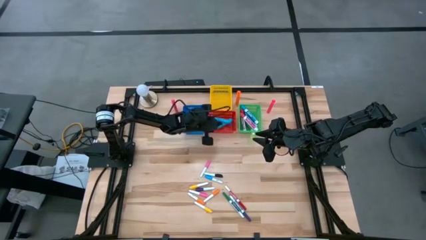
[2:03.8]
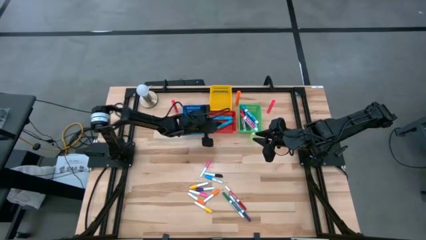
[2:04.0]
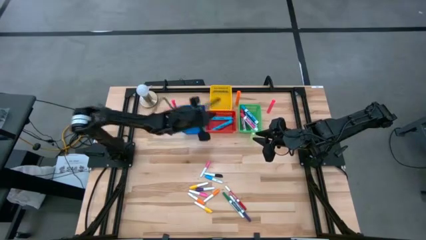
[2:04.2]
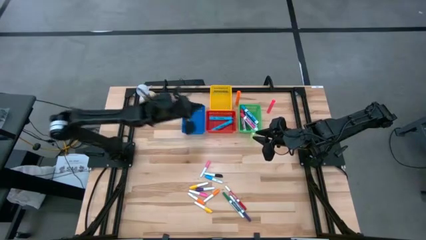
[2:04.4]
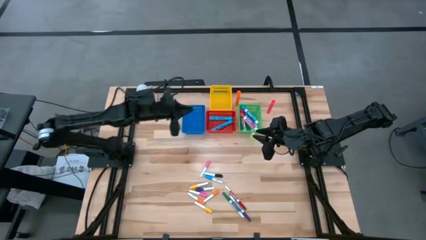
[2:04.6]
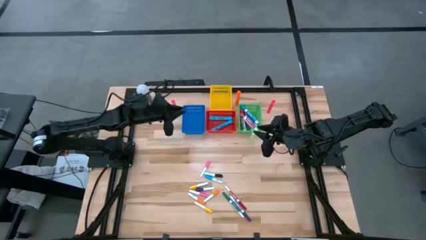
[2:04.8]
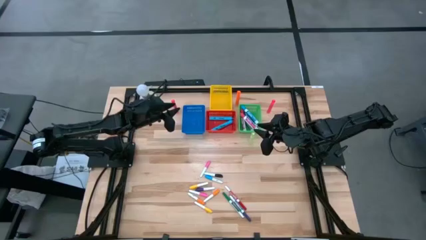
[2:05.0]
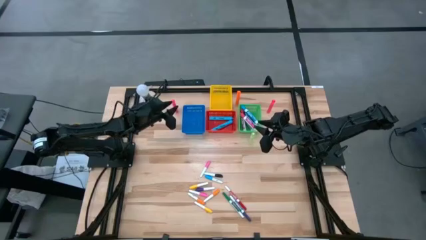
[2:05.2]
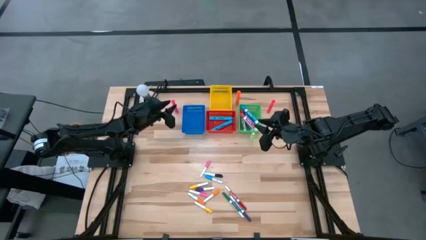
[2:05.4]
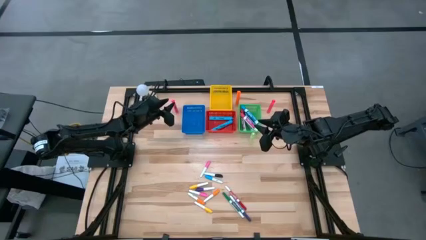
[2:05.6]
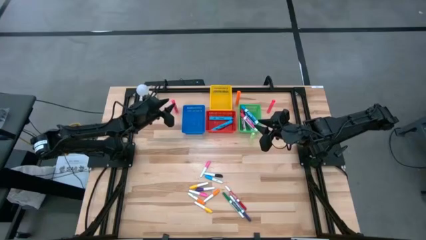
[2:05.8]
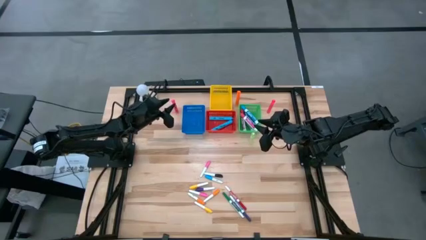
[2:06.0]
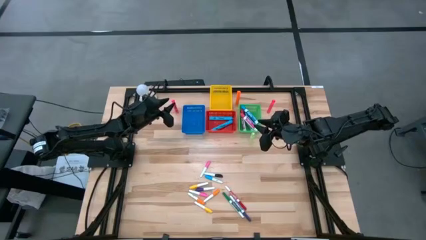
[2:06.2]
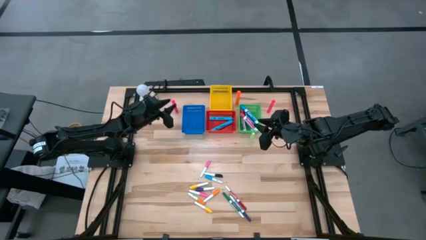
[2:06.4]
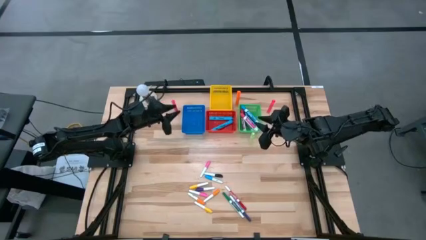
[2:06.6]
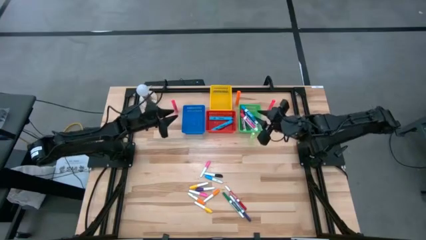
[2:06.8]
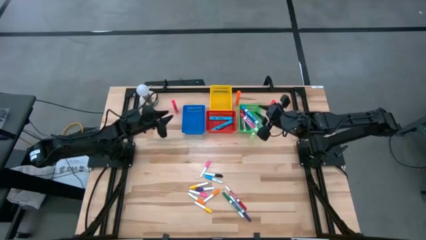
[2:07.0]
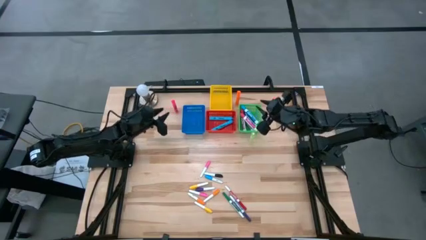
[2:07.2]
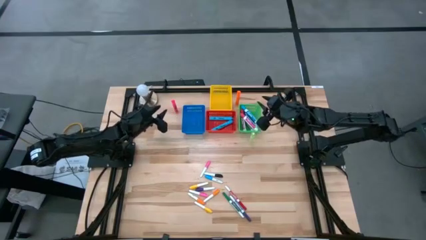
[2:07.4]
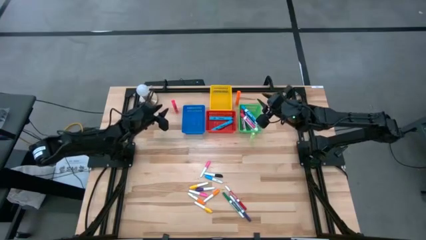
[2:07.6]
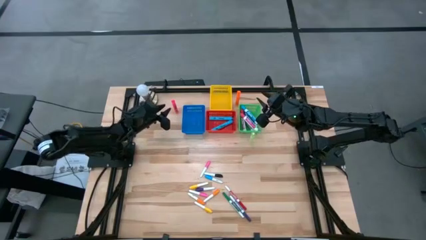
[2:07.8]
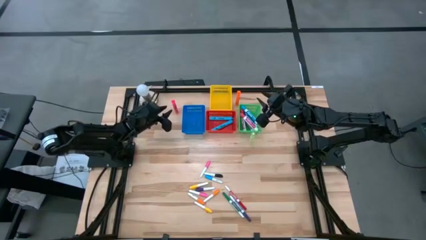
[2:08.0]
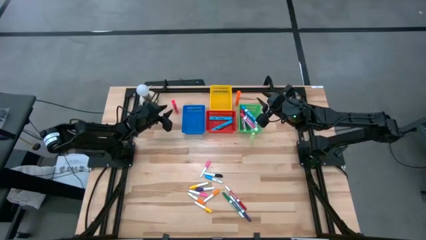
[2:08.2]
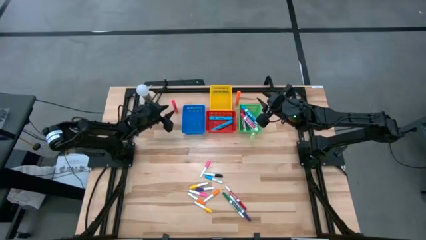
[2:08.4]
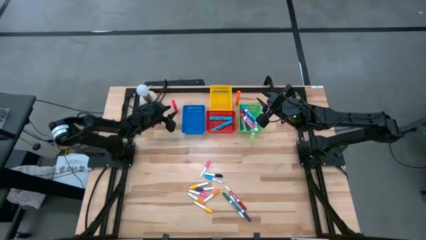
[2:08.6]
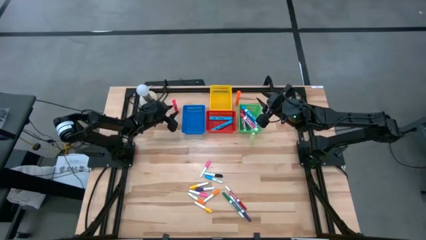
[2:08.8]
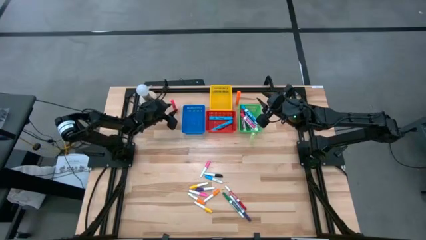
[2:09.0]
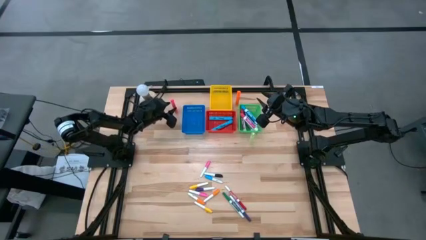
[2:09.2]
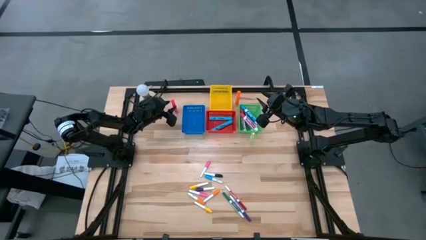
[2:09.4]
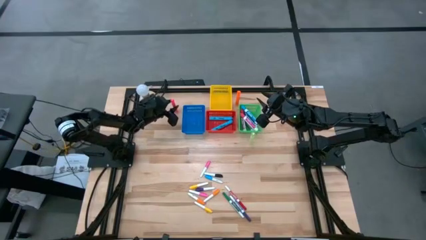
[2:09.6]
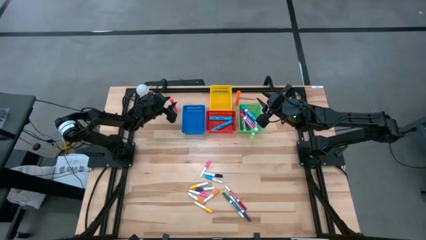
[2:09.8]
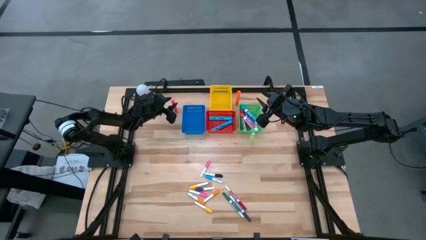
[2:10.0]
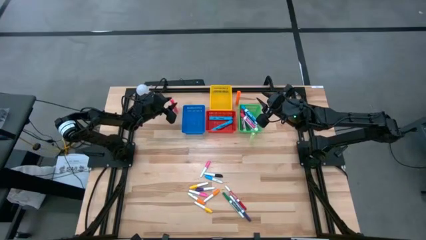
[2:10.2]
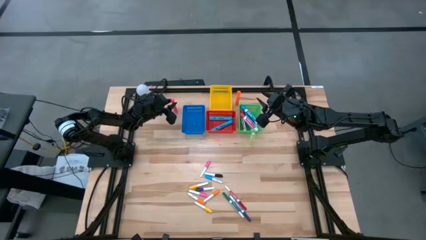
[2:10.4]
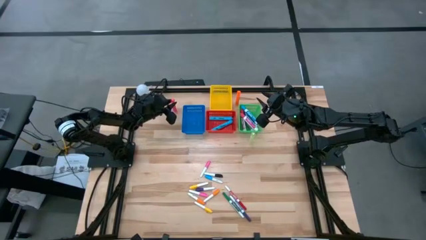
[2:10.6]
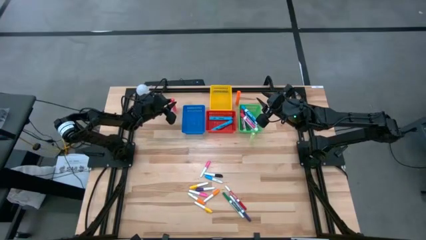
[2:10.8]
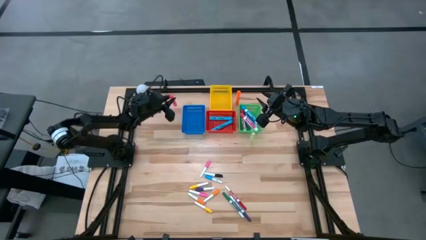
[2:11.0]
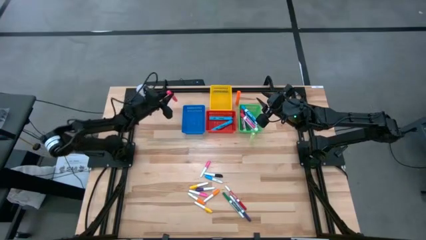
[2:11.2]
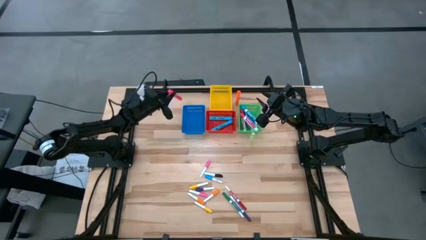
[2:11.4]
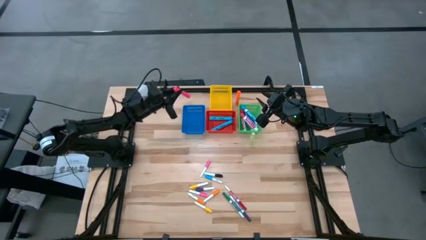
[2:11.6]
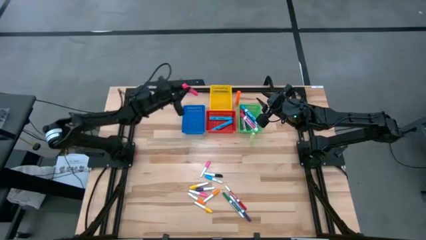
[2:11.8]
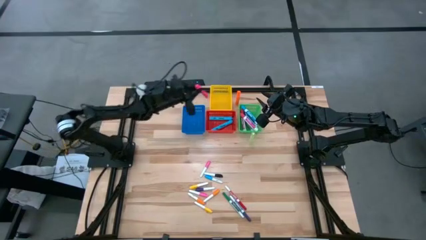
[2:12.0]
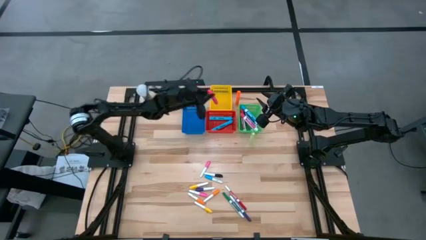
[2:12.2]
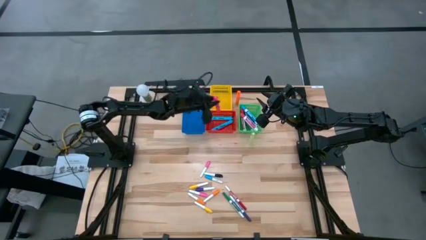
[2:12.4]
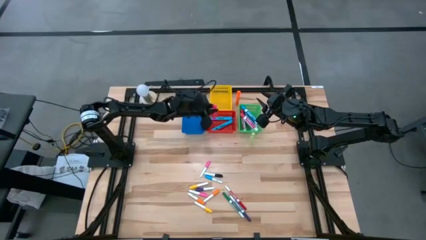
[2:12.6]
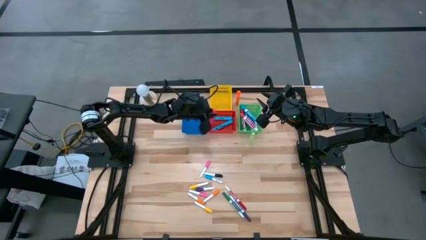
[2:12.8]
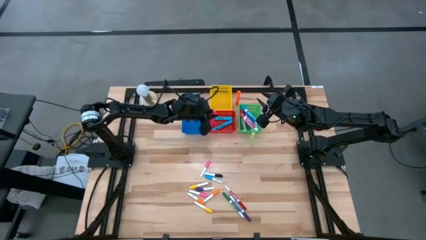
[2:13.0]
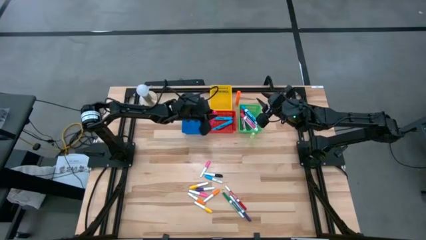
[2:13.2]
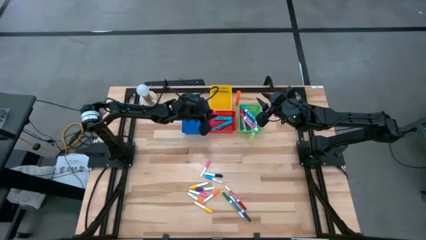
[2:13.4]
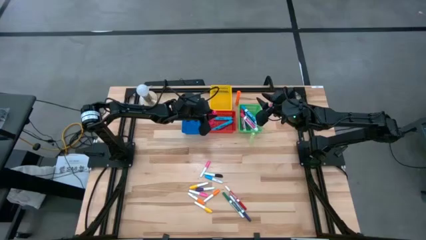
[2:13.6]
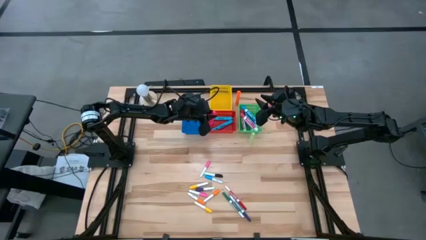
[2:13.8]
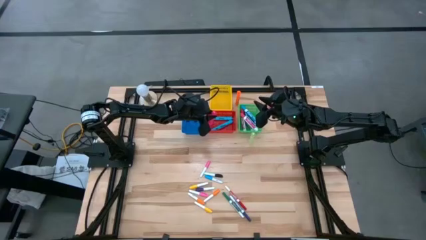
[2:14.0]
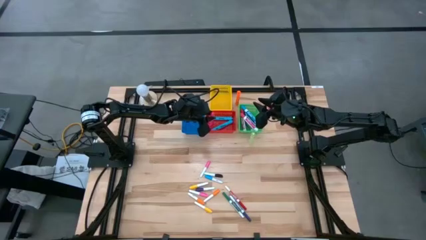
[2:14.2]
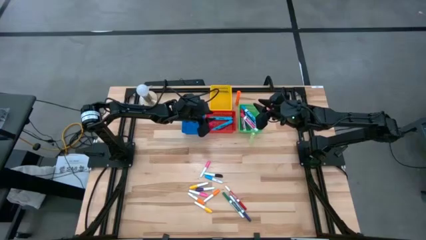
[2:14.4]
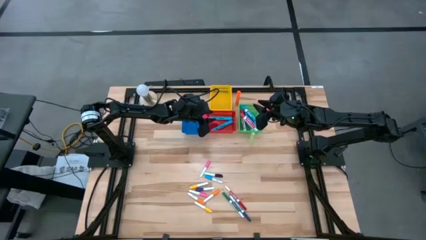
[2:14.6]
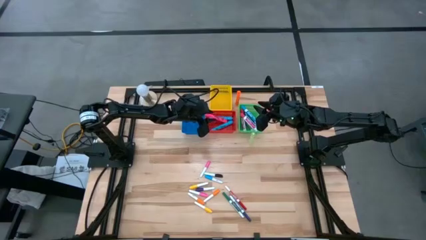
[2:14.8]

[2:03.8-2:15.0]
Task: Pick & Place Markers
Put the left large pink highlighter pen into the red bin

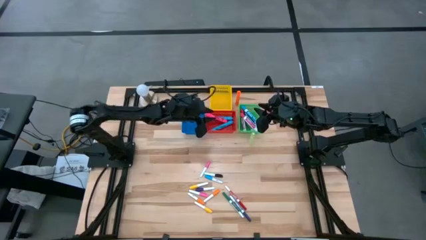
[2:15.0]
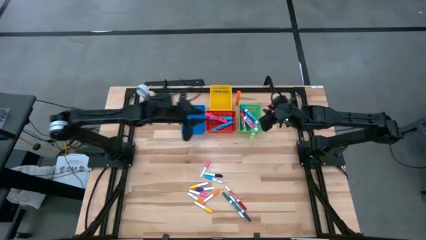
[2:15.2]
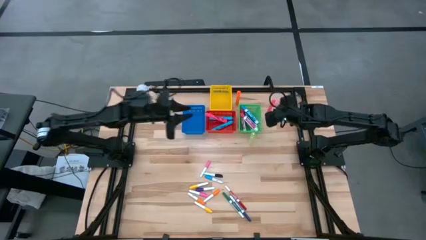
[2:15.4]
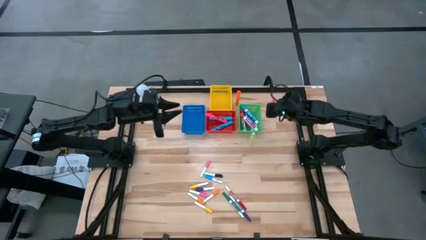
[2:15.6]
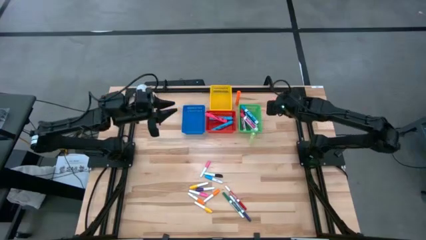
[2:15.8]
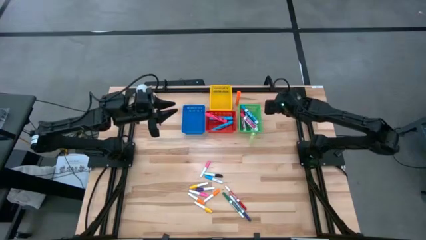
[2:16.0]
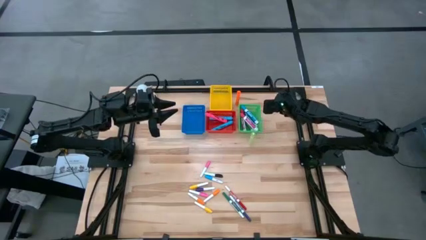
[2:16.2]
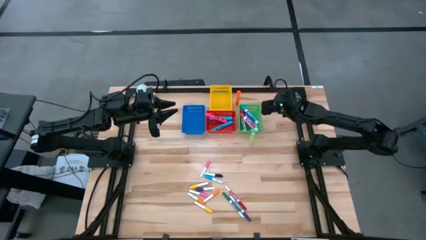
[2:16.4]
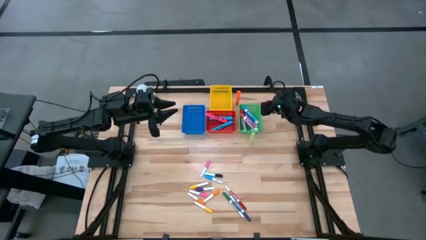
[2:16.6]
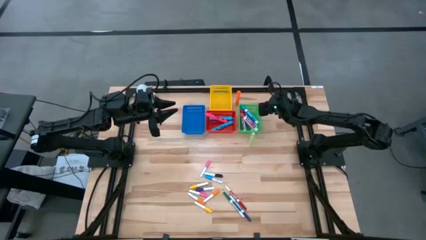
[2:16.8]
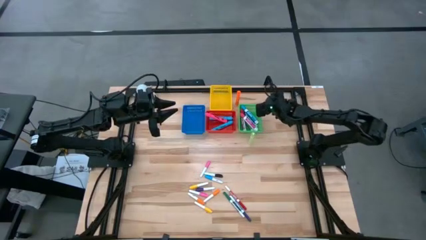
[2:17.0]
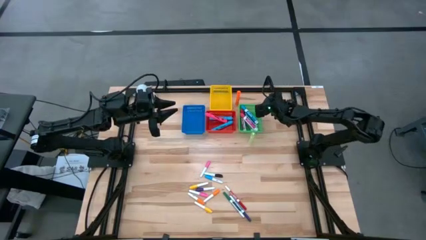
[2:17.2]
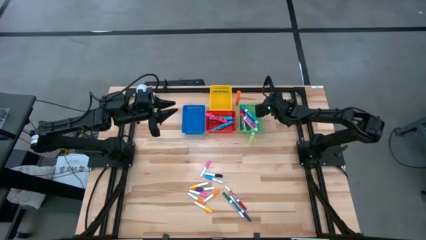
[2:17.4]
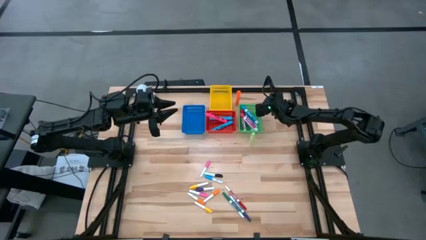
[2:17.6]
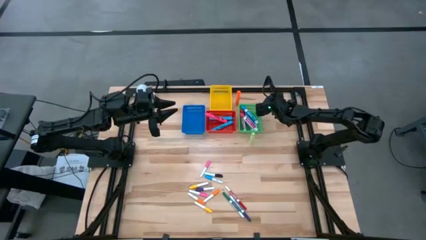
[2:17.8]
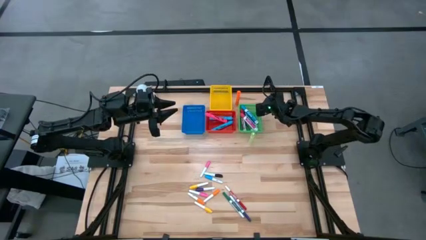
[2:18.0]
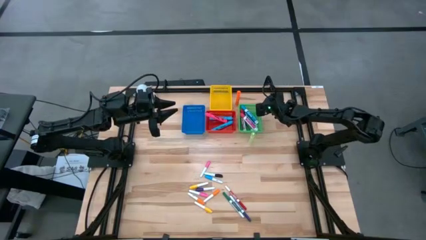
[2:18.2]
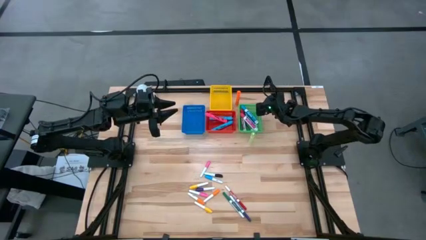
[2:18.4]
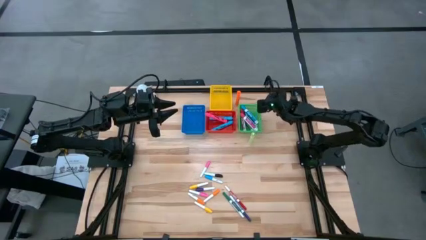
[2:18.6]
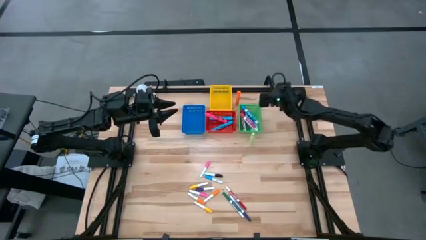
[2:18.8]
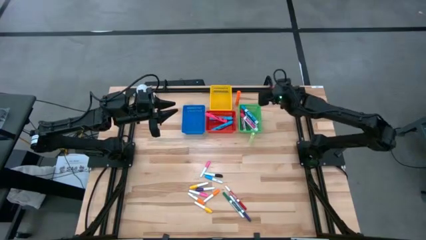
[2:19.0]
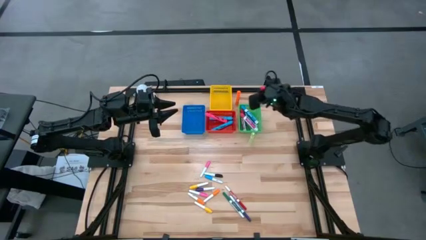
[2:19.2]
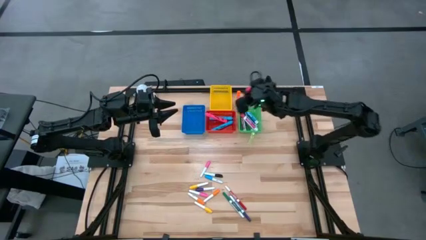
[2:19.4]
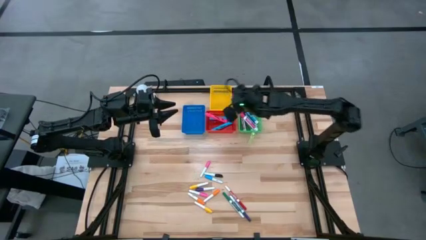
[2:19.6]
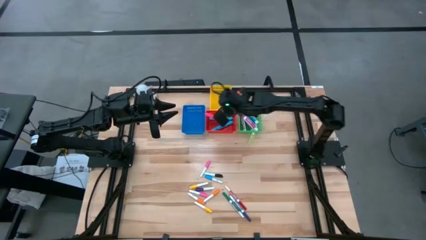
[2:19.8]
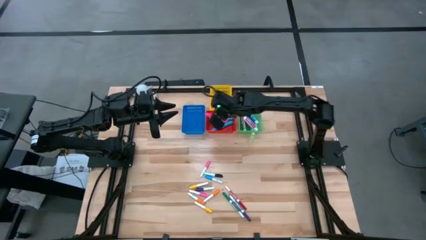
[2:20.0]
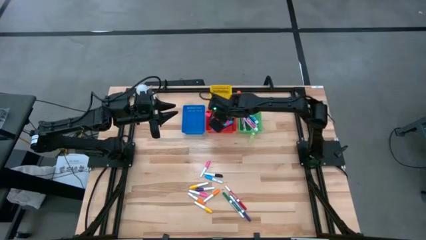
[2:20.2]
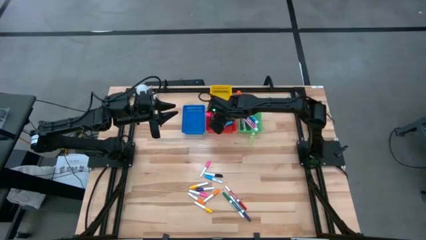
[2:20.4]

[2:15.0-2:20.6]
Put the large pink highlighter pen into the red bin
